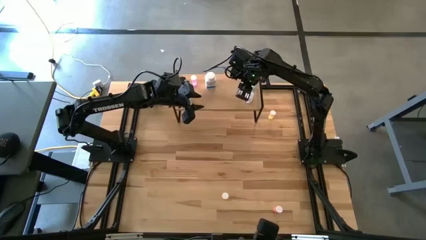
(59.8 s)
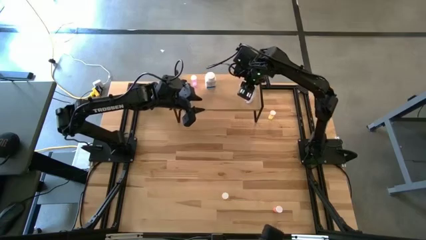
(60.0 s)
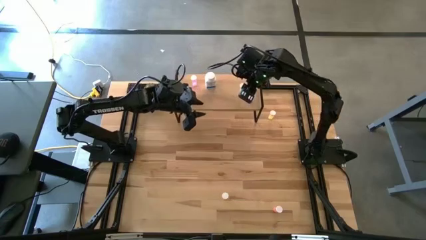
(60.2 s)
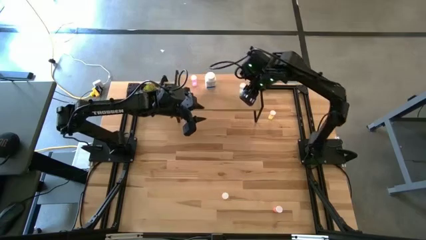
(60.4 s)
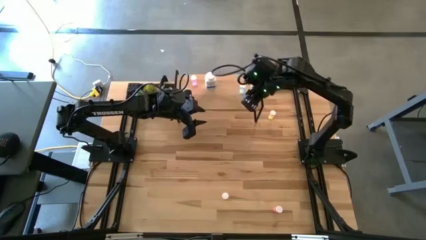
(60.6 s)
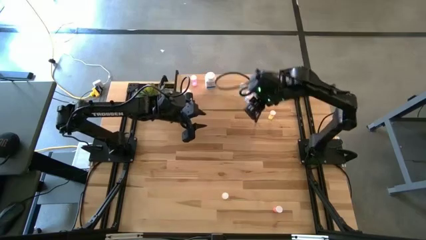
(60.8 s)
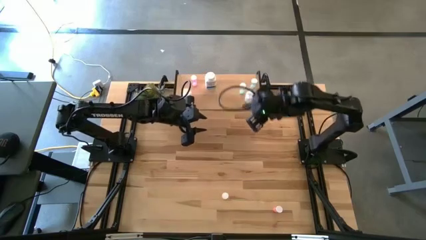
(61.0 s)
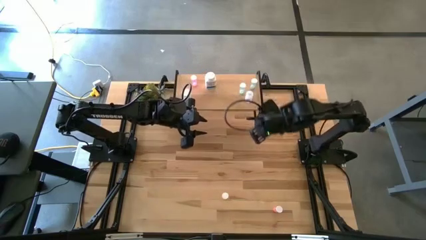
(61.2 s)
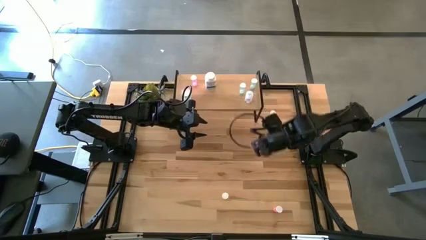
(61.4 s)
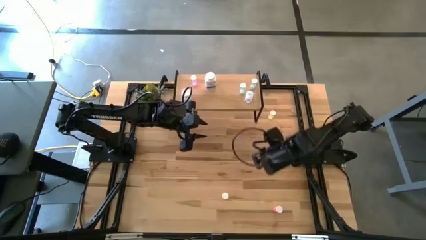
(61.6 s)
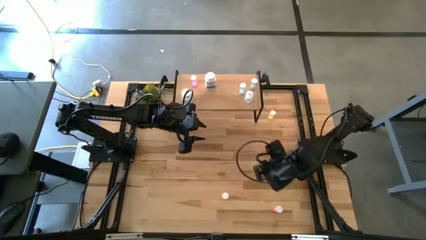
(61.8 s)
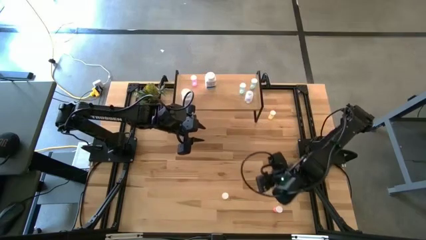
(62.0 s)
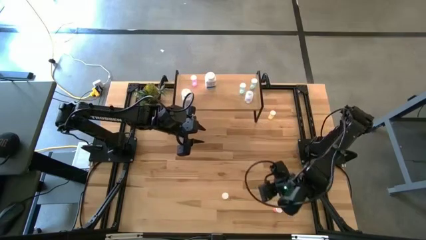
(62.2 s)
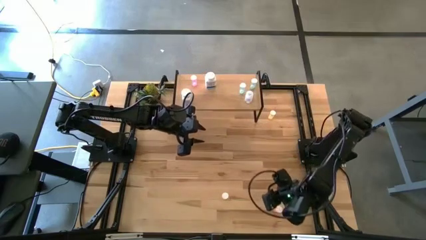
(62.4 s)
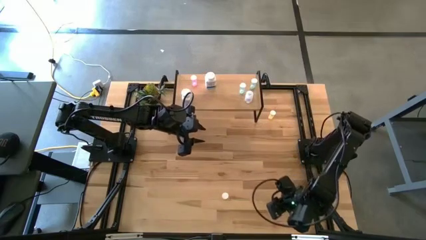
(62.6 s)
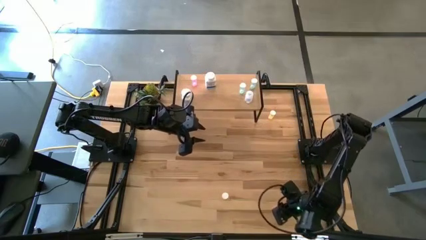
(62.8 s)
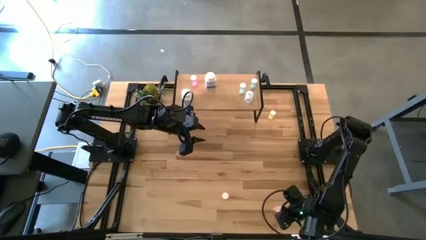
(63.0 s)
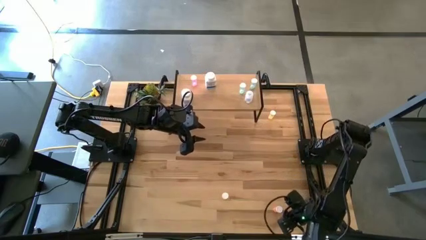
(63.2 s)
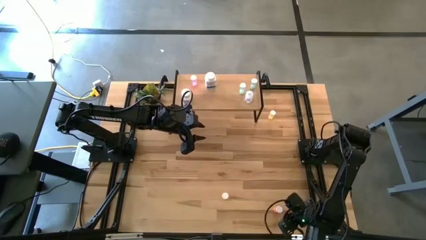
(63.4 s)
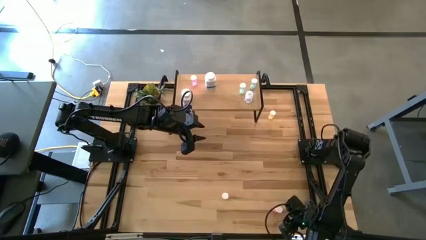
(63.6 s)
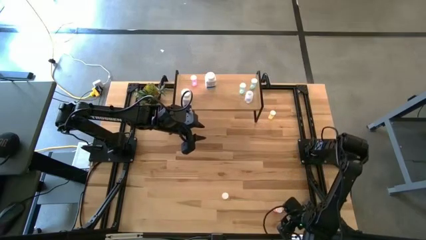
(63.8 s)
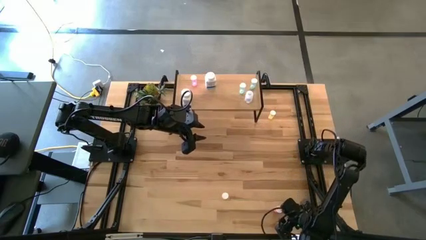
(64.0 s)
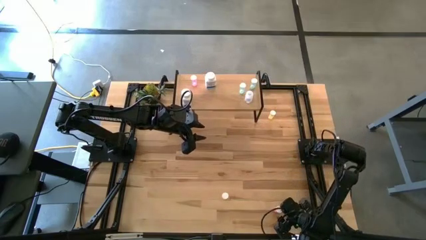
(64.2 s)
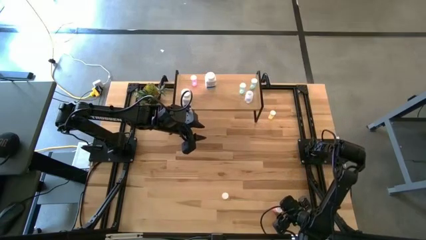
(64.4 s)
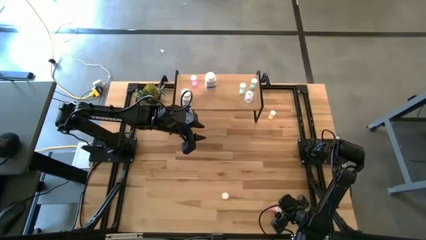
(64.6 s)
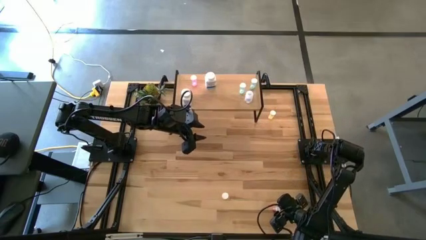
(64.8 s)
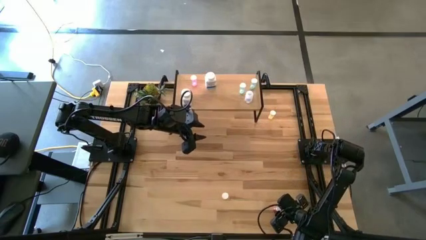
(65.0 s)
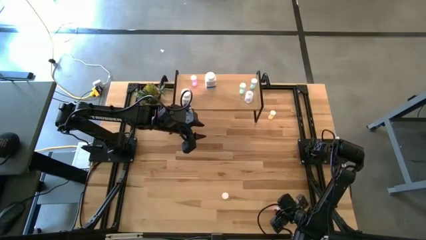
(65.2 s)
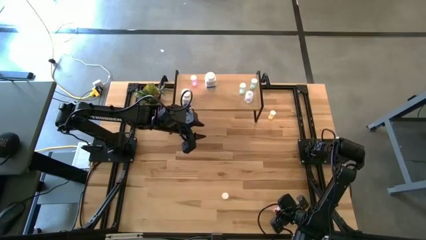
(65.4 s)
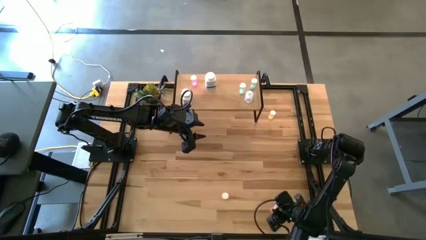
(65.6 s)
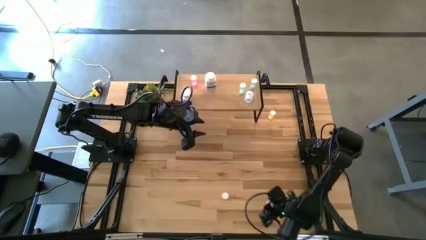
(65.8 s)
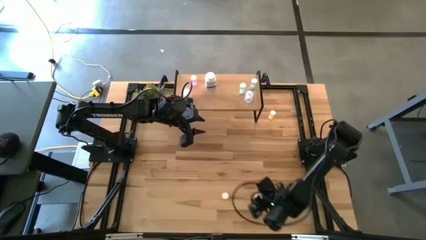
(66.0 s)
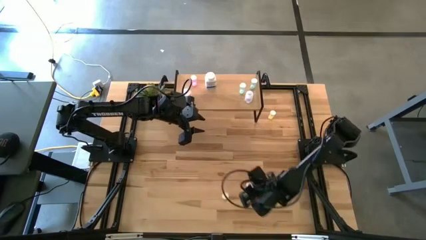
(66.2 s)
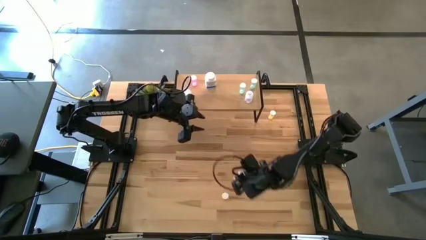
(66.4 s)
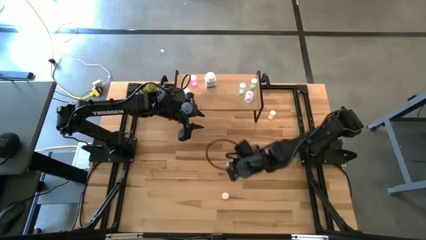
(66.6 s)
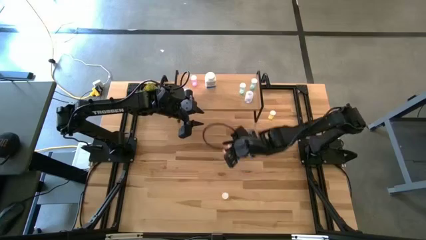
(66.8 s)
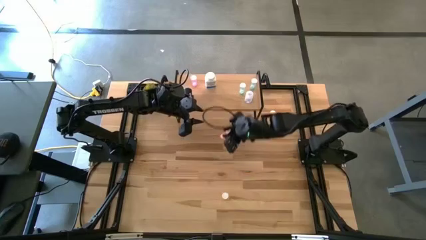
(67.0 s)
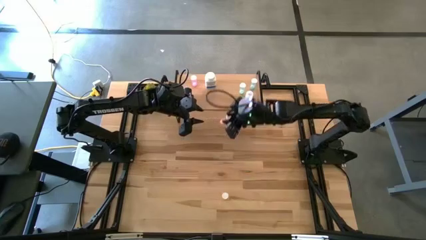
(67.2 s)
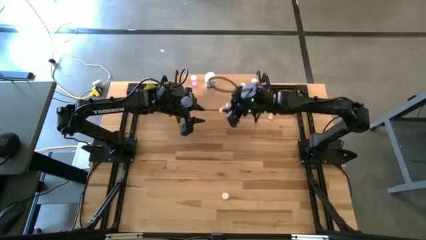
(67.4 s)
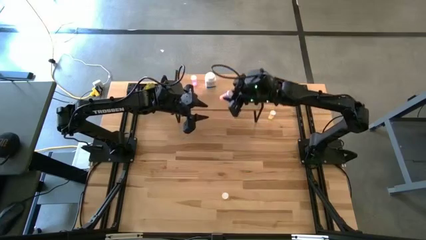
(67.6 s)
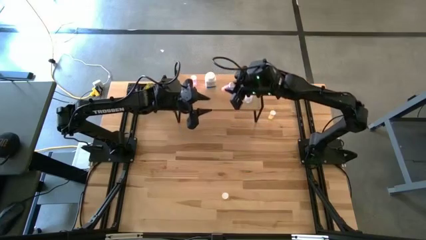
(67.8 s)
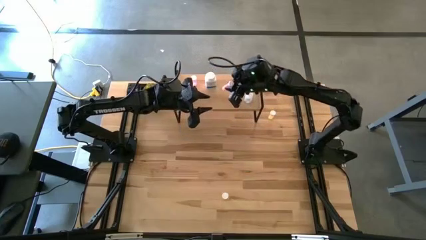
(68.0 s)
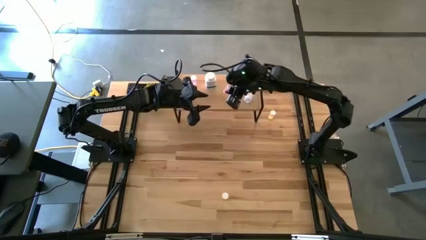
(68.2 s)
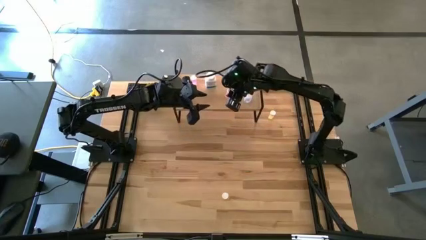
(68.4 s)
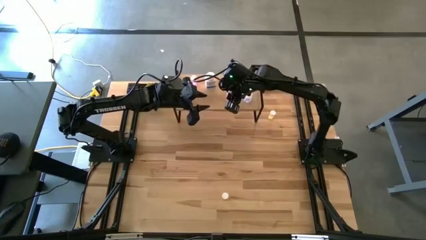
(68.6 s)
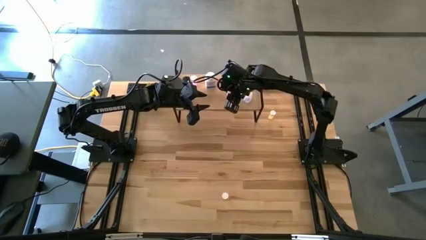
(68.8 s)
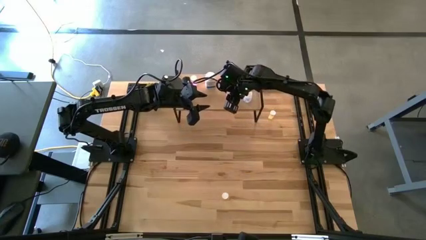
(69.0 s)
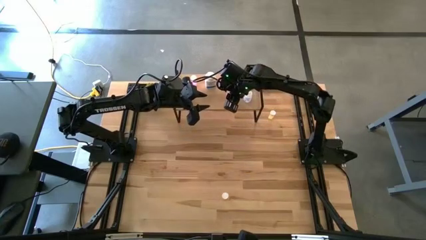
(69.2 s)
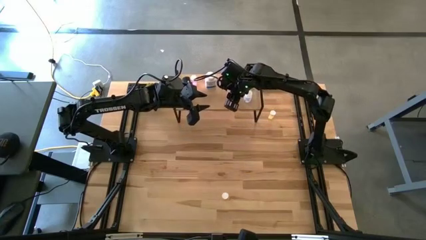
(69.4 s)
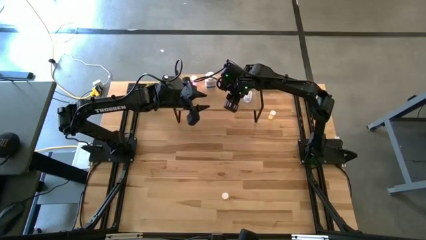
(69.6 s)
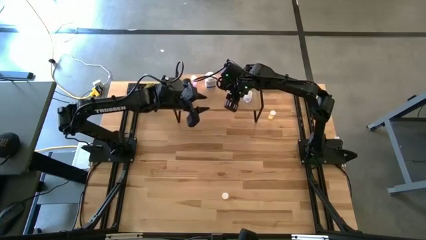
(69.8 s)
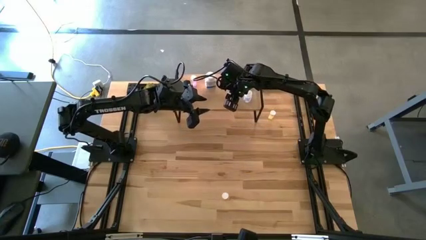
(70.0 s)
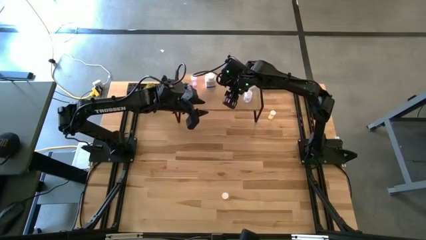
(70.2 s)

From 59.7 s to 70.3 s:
Task: Pick and place medicine bottles onto shelf by color
Put the red pill bottle on the shelf

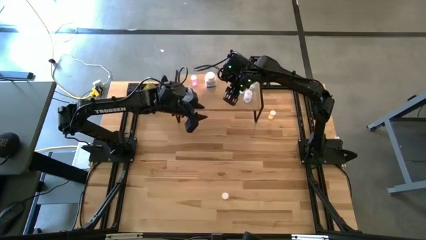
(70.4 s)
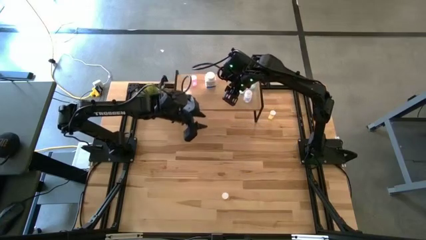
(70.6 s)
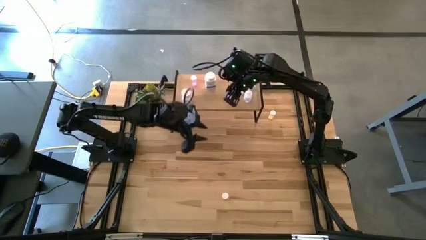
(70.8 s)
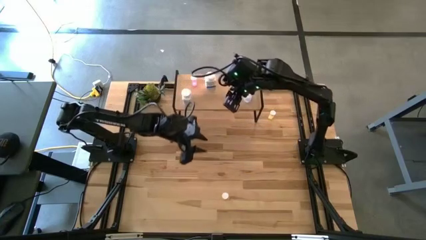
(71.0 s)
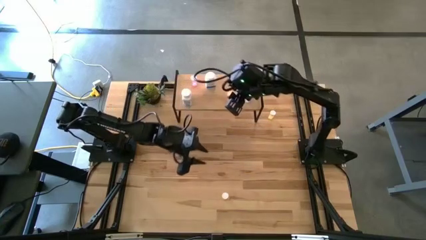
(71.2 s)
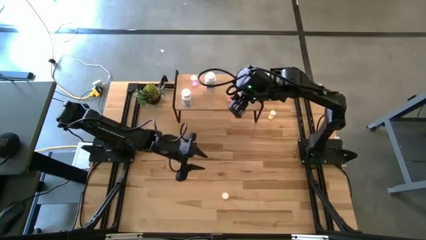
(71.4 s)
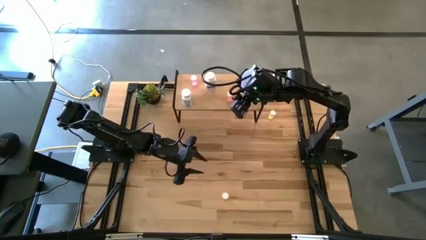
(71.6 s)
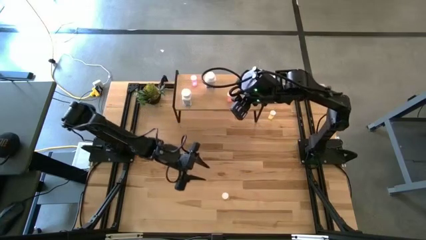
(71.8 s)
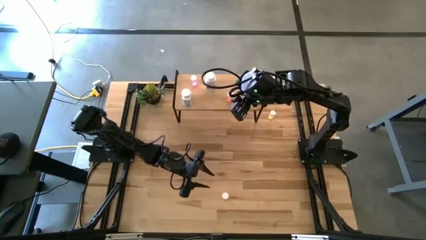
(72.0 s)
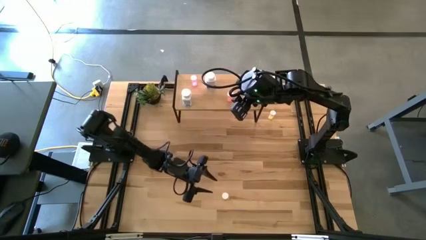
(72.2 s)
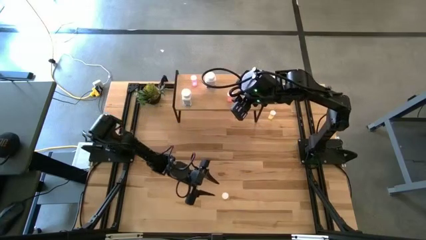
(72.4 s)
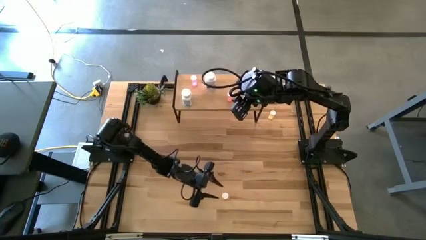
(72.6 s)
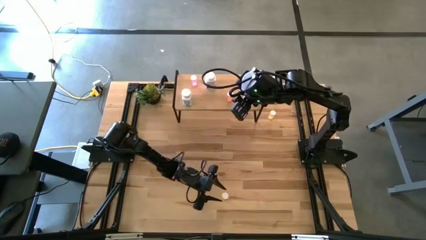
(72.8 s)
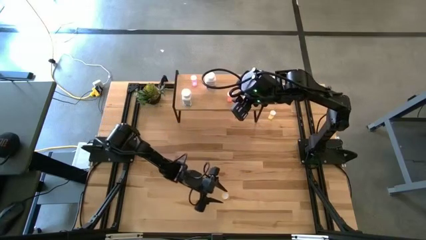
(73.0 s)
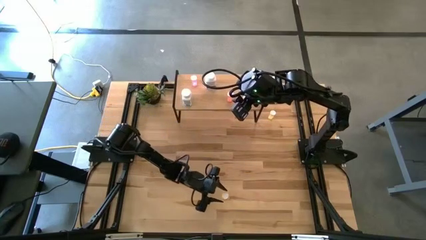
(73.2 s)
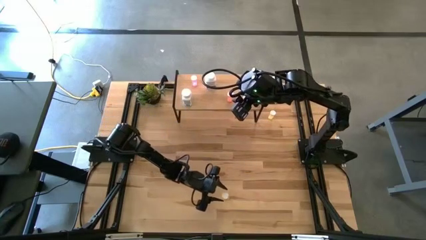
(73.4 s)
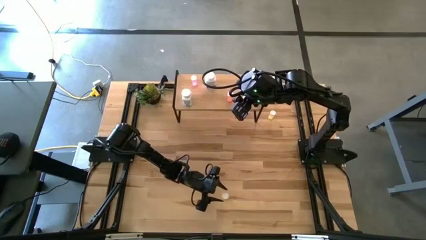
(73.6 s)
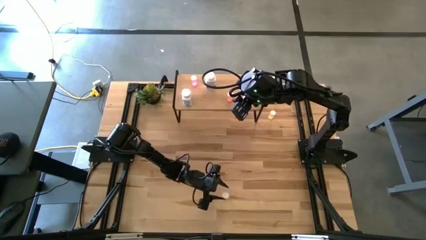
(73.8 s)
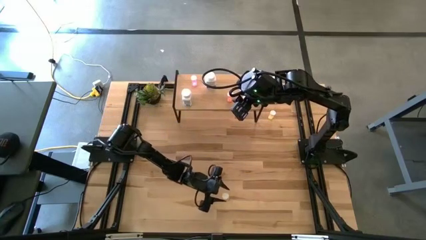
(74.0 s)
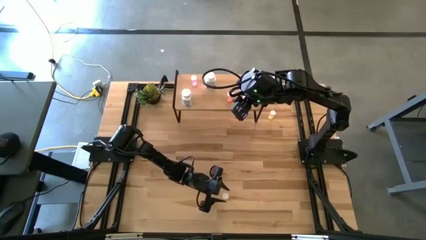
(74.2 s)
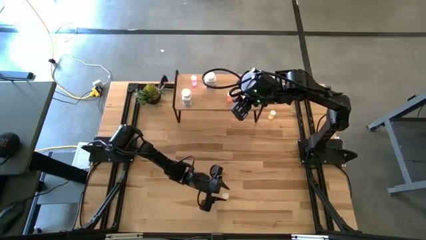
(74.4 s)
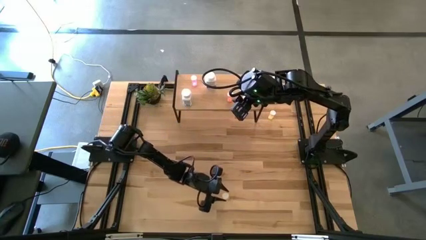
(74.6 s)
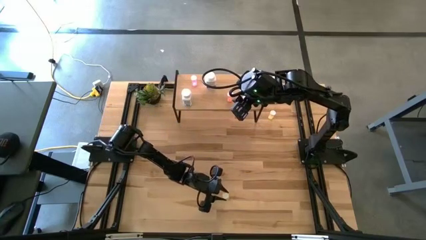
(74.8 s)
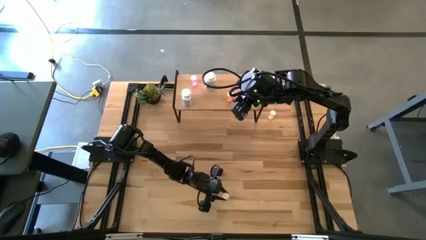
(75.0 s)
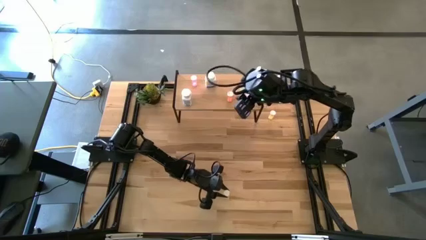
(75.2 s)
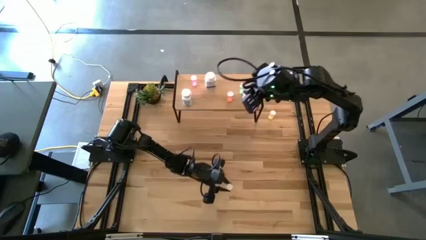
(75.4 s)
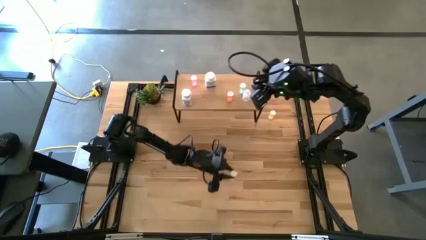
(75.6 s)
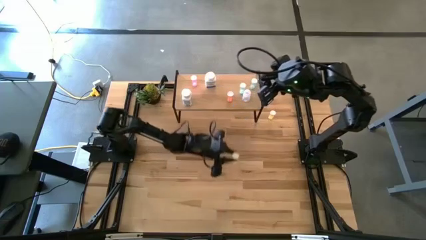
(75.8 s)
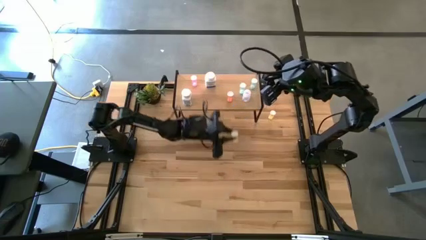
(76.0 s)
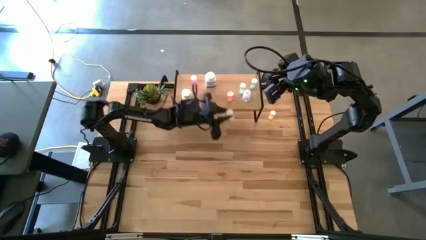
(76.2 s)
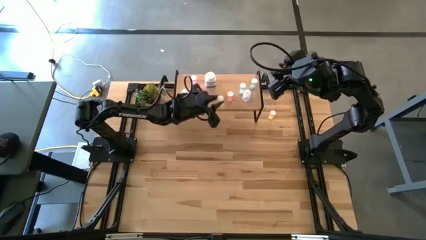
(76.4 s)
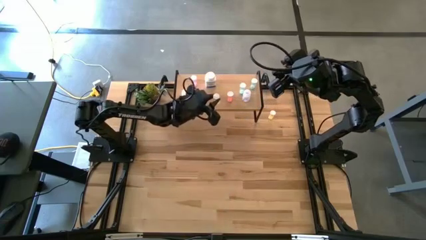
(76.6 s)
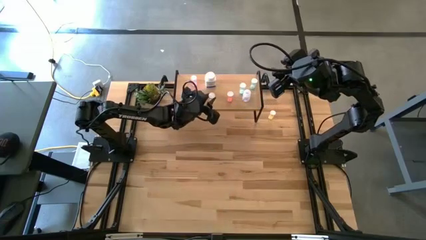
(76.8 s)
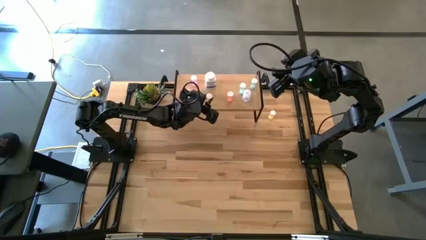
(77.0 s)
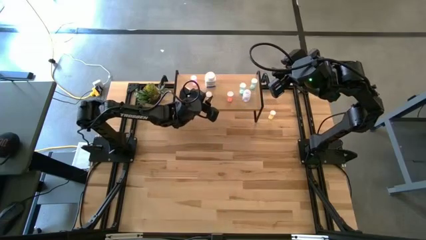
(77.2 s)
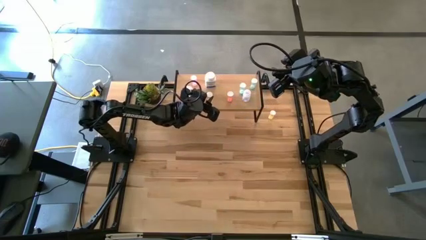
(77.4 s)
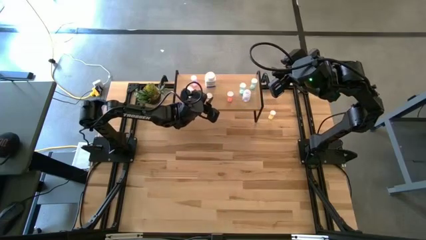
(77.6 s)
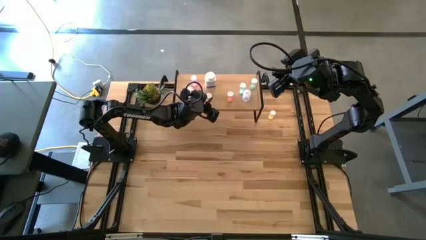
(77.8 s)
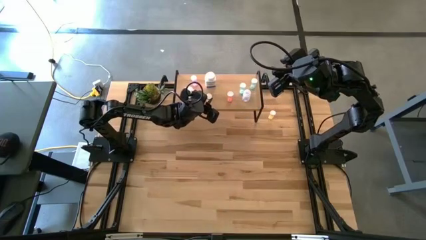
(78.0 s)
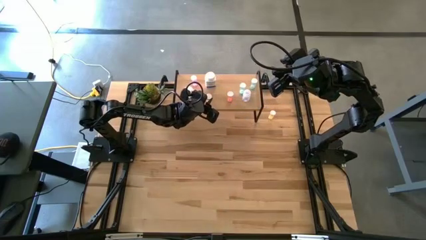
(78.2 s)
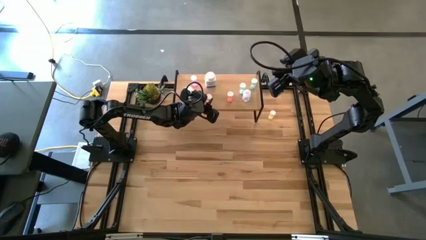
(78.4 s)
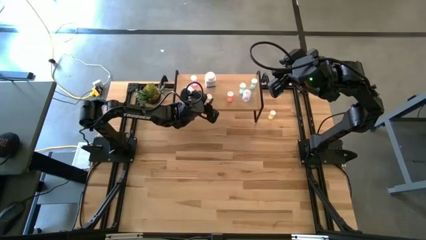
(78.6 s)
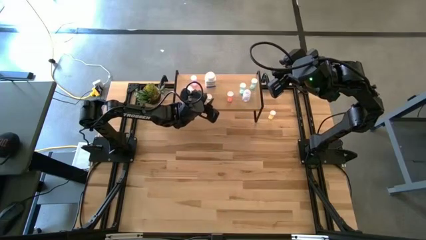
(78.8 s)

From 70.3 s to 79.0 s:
Put the bottom yellow pill bottle on the shelf
